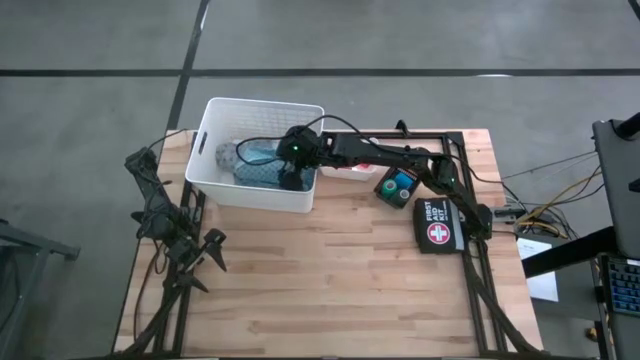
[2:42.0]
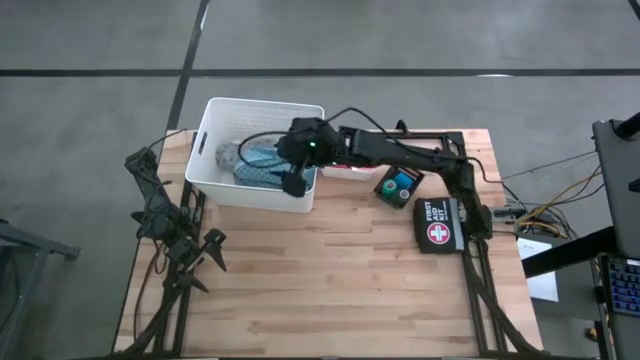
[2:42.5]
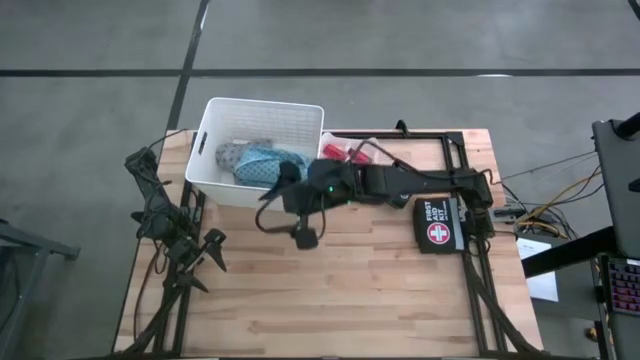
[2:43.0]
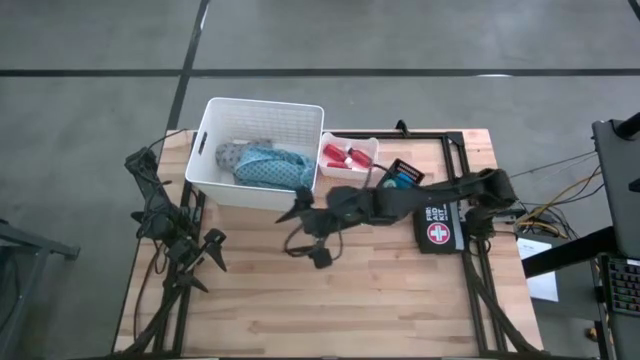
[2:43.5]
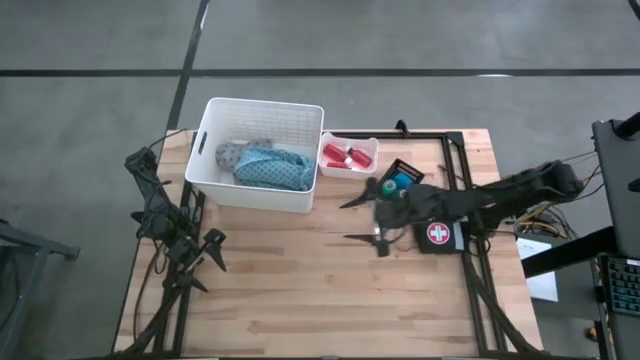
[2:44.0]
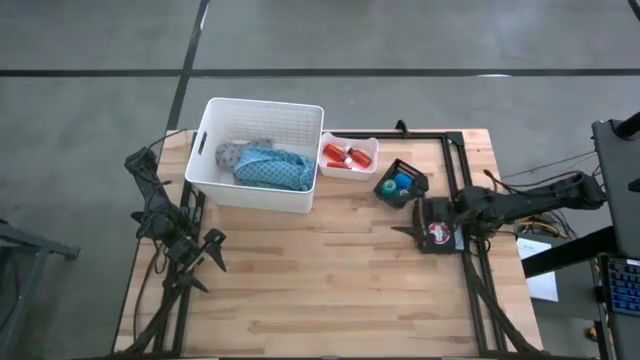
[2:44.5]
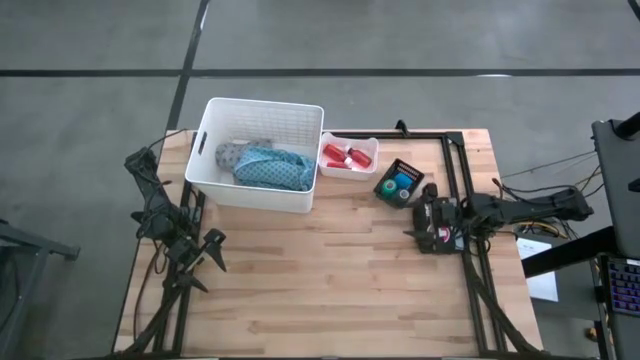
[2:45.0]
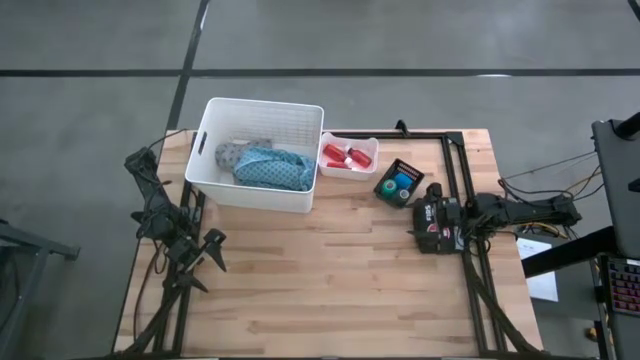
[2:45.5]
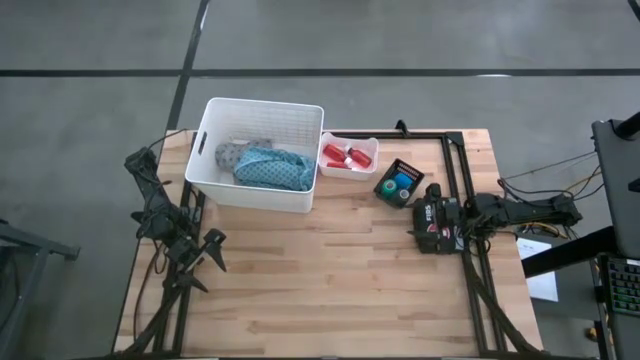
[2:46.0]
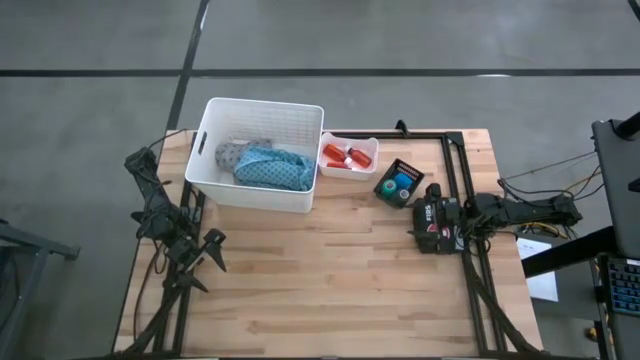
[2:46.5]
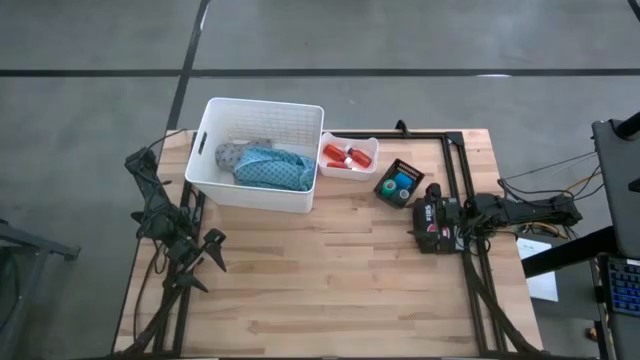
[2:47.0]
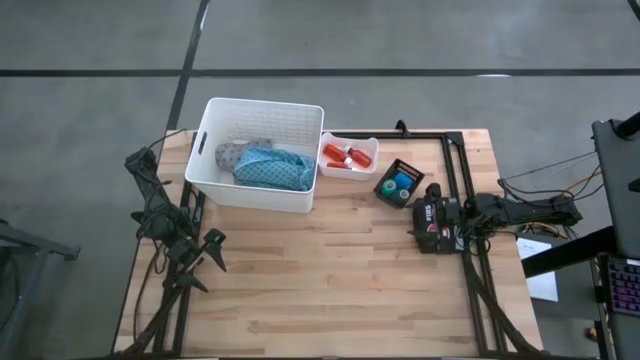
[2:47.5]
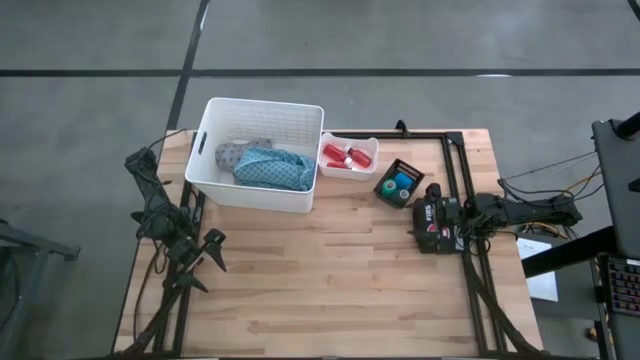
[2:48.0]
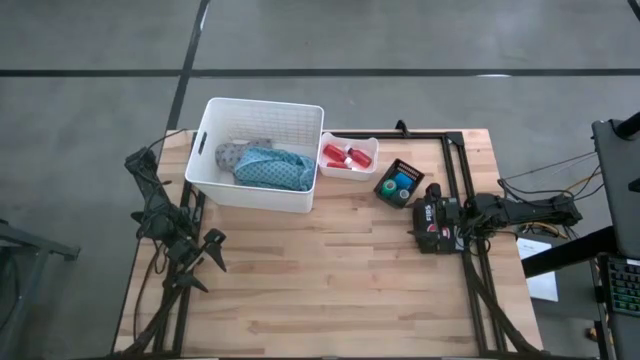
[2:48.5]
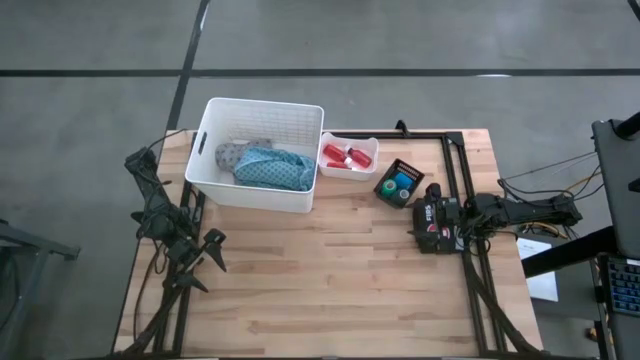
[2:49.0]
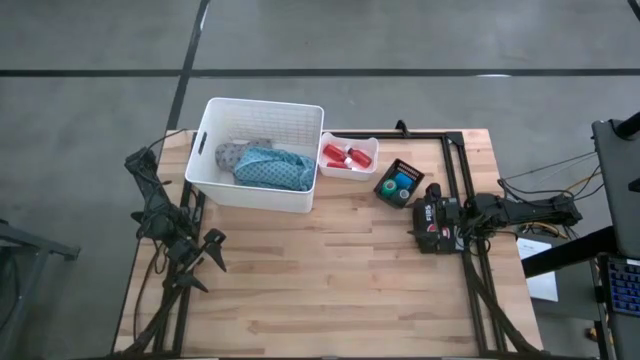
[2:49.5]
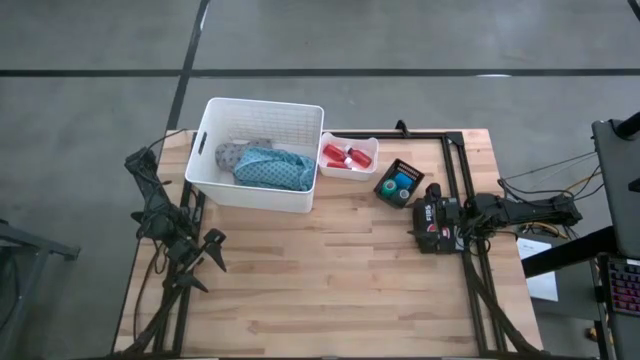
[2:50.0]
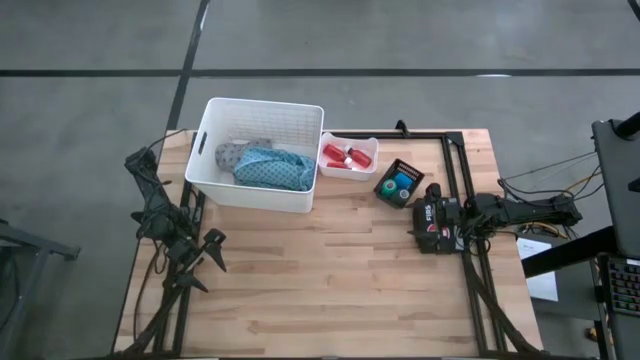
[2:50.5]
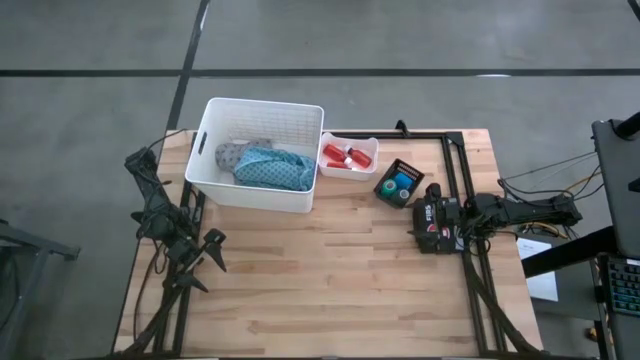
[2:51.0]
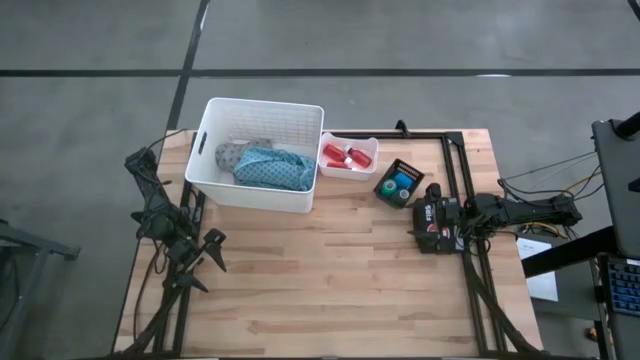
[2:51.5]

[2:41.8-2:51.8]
Task: Pick & Place Medicine items
Return to Home Position

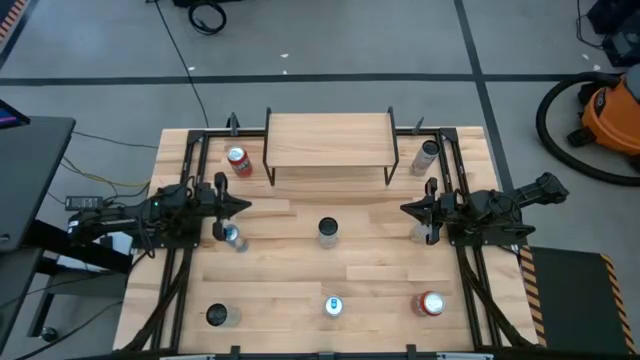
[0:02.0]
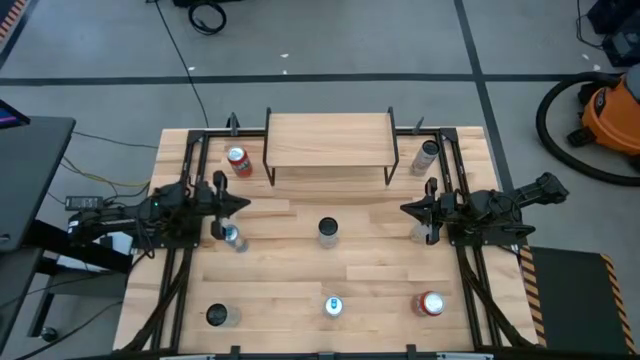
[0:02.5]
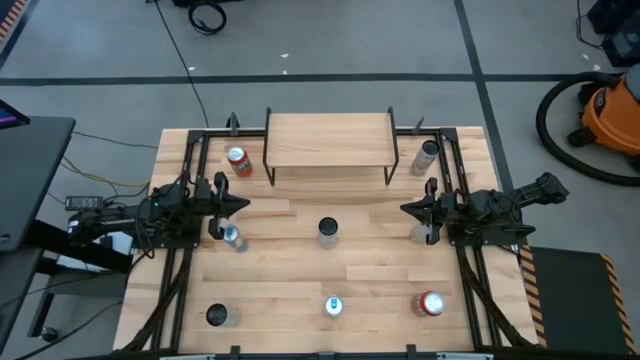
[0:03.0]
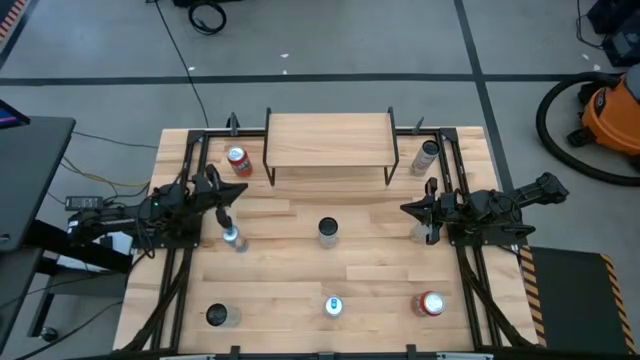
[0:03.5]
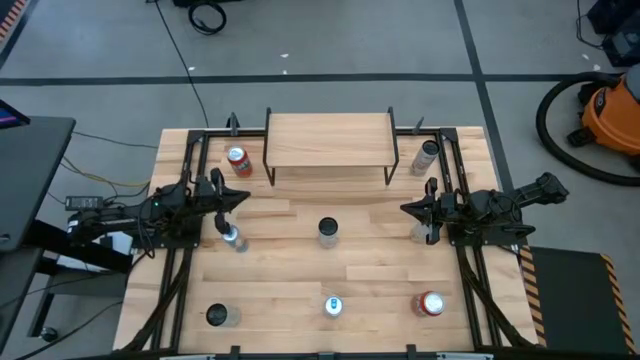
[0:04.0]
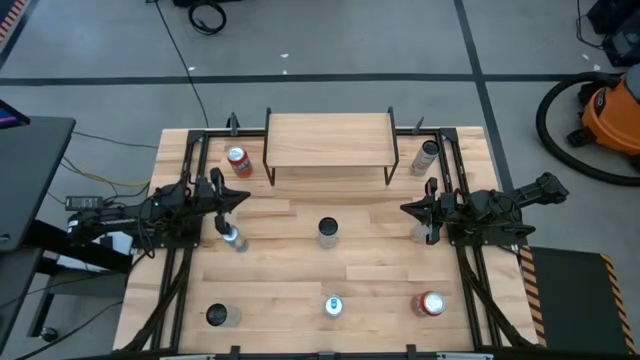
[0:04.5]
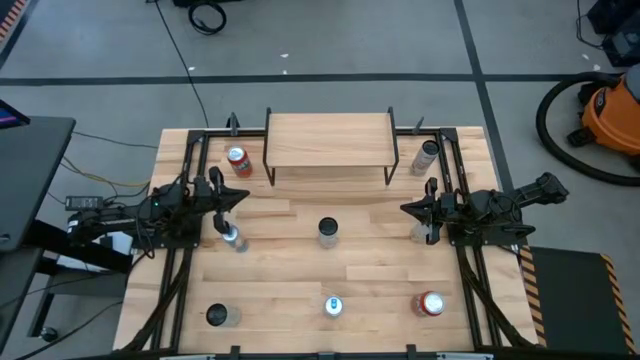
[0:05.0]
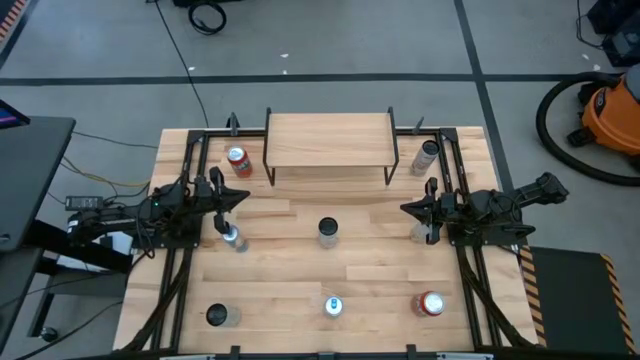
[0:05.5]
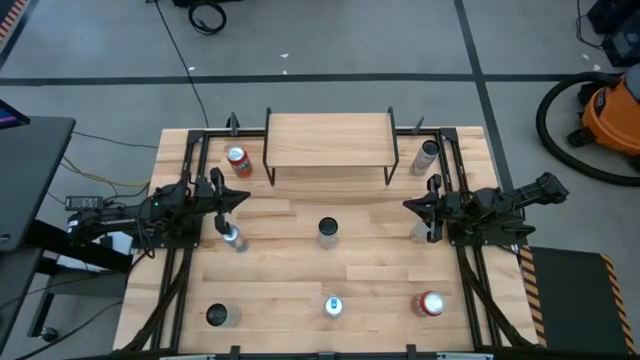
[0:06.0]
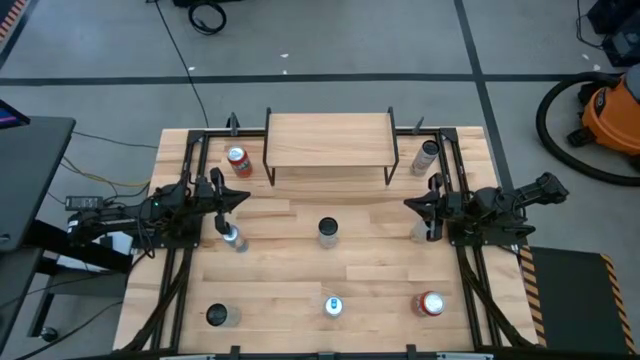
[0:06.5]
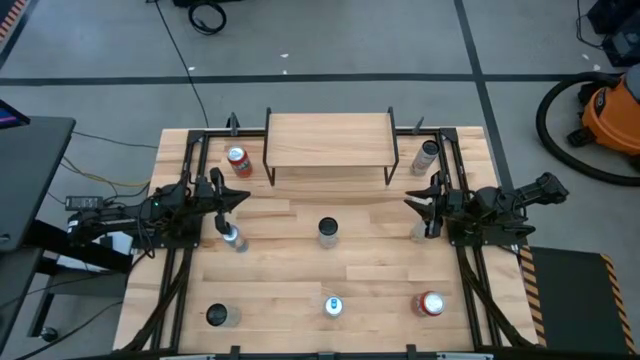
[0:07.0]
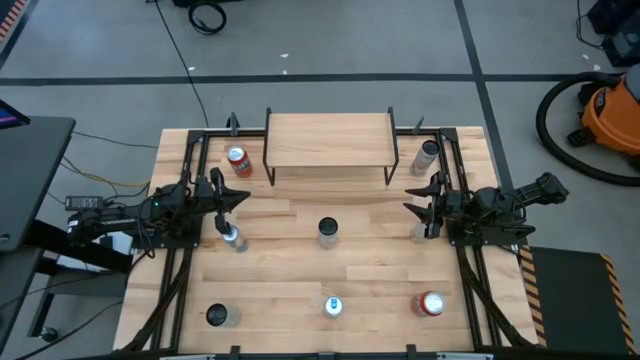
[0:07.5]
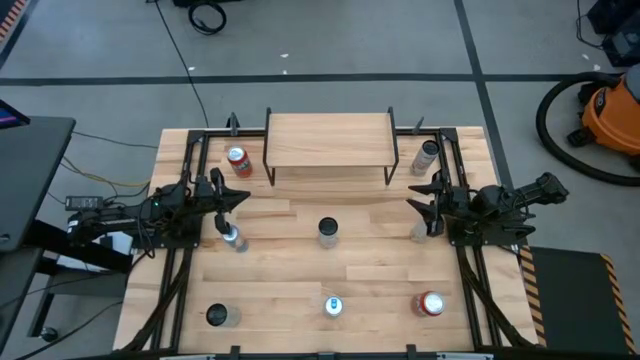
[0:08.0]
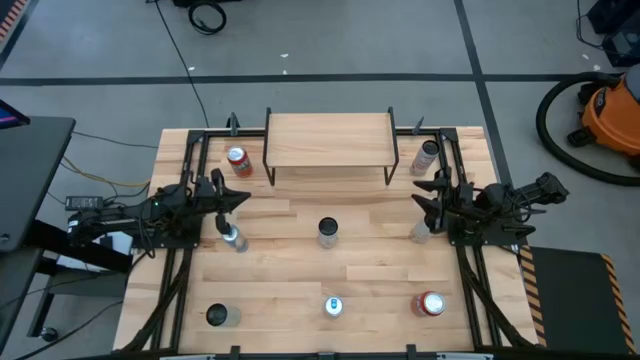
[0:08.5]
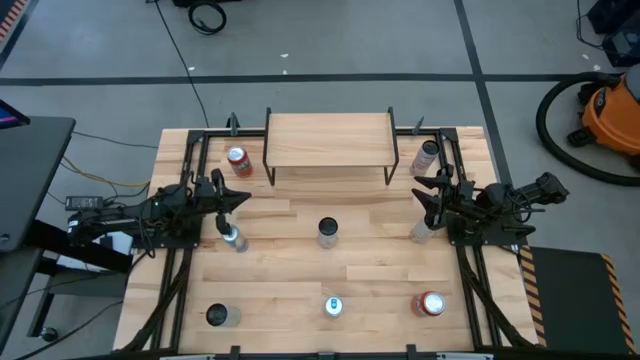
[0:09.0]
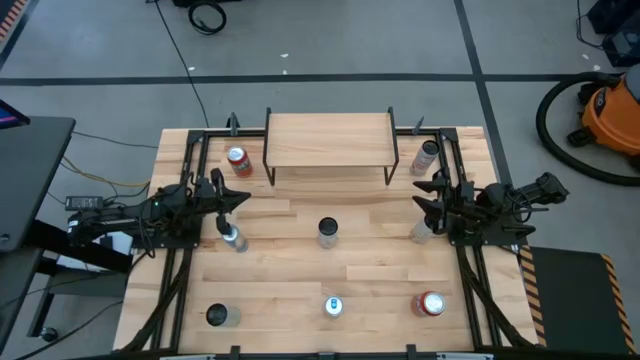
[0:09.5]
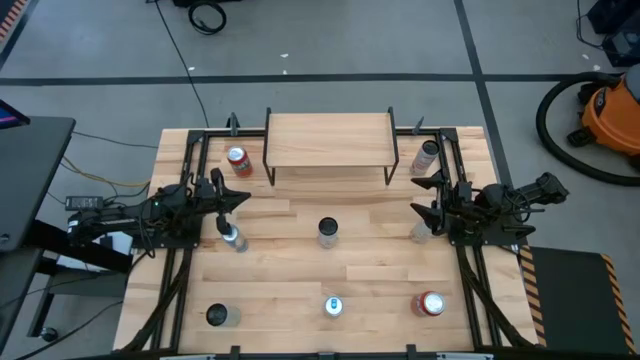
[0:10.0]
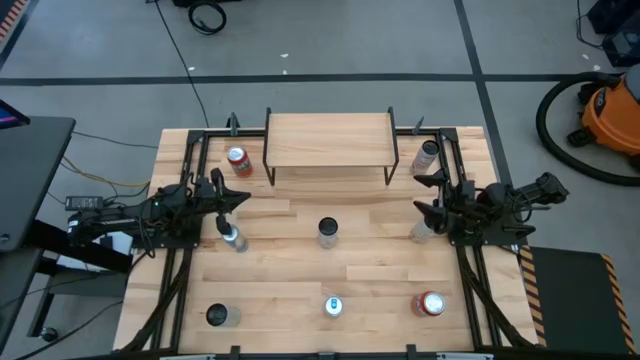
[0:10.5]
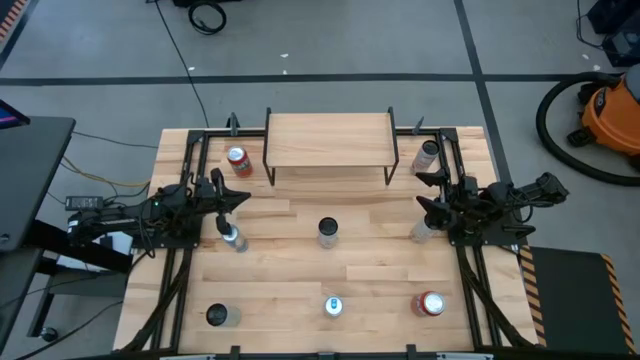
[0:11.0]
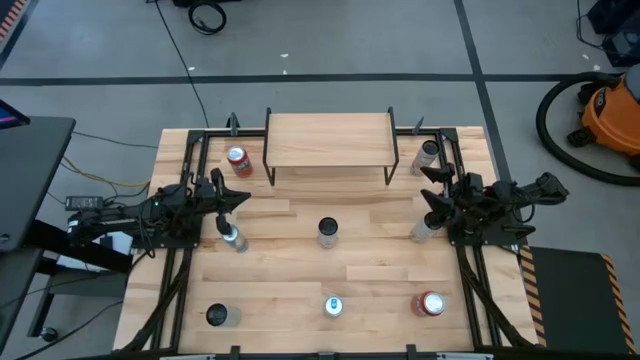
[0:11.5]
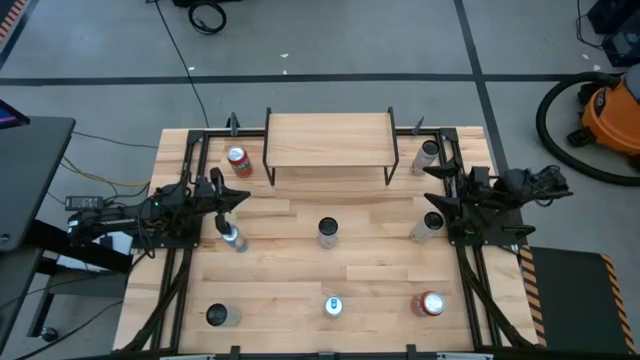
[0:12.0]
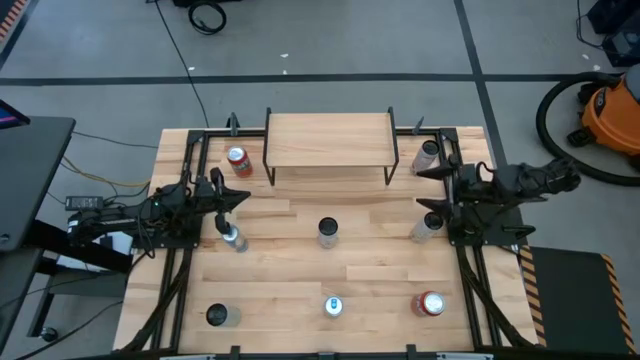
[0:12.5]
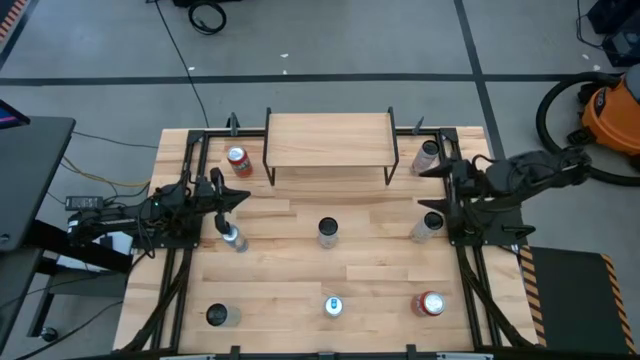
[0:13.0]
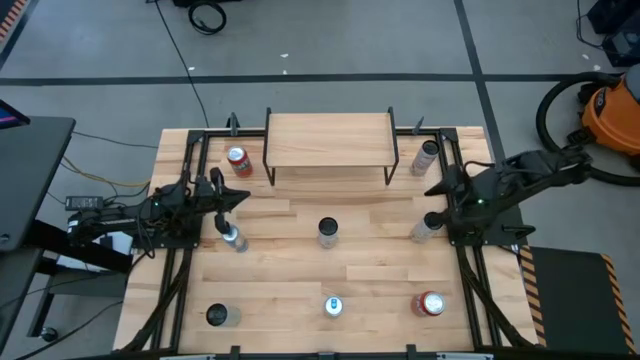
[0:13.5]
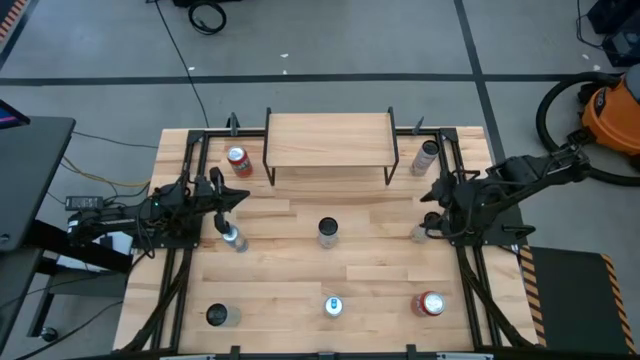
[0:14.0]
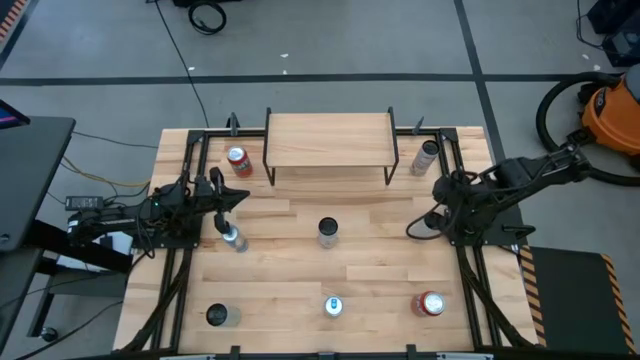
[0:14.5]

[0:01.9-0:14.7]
Task: Place canned beverage on shelf
Put the top white yellow soda can on the shelf
